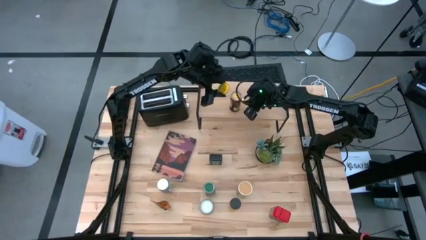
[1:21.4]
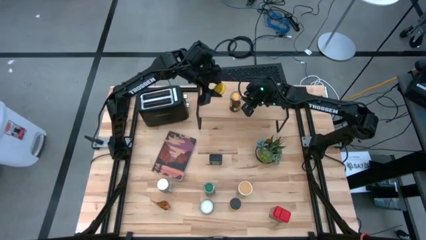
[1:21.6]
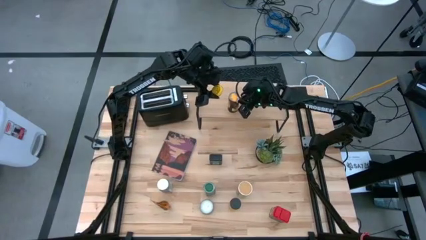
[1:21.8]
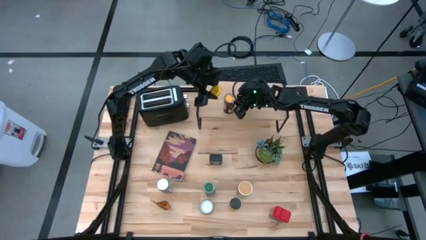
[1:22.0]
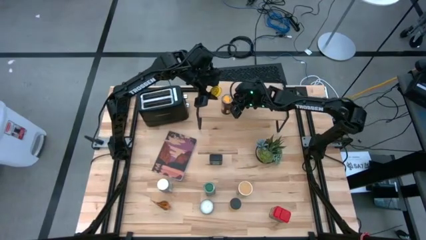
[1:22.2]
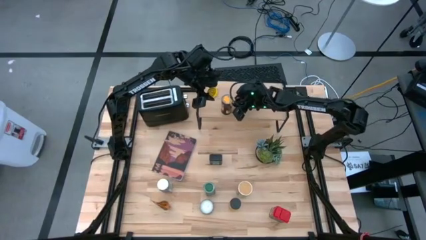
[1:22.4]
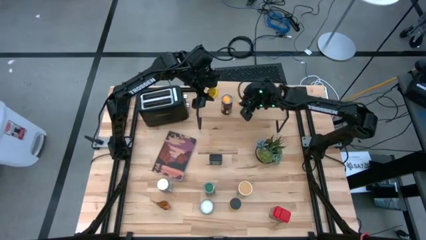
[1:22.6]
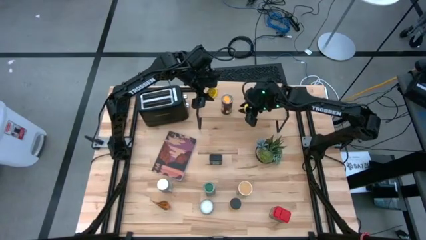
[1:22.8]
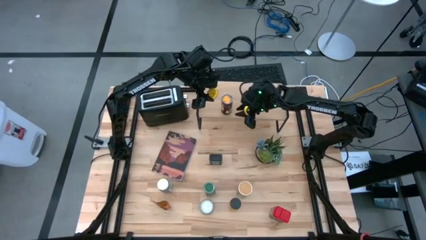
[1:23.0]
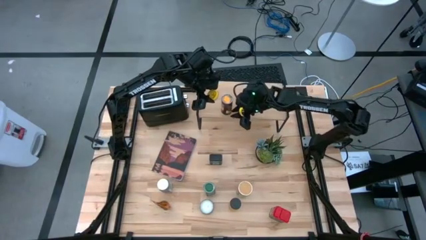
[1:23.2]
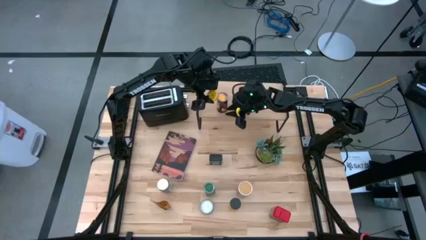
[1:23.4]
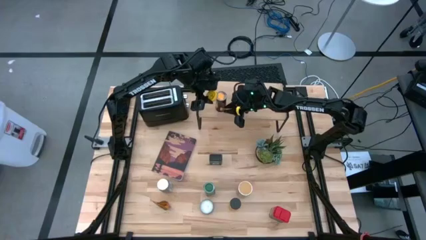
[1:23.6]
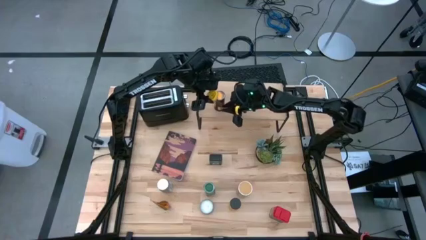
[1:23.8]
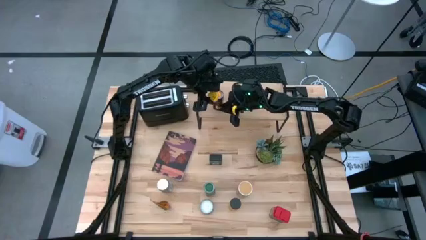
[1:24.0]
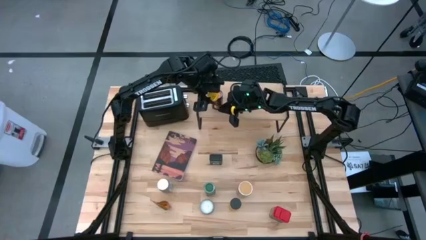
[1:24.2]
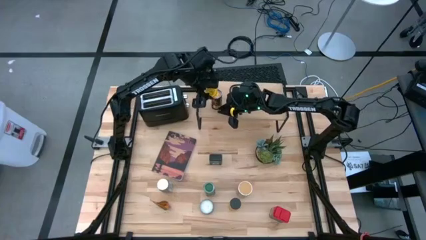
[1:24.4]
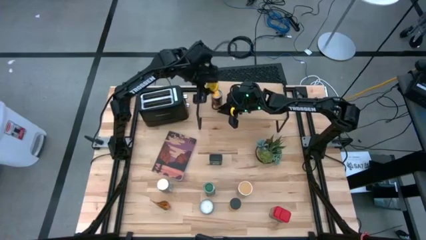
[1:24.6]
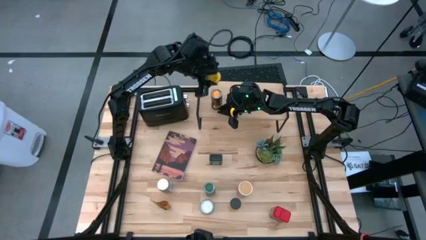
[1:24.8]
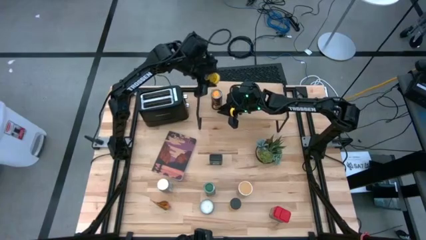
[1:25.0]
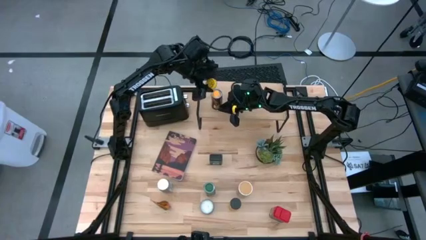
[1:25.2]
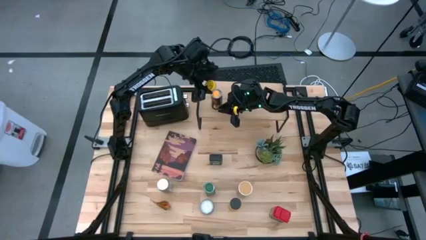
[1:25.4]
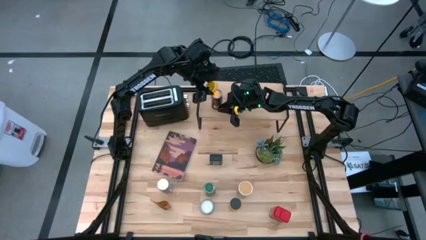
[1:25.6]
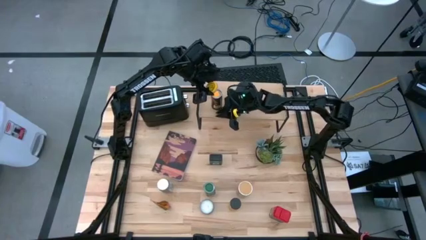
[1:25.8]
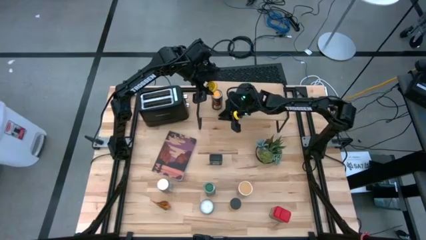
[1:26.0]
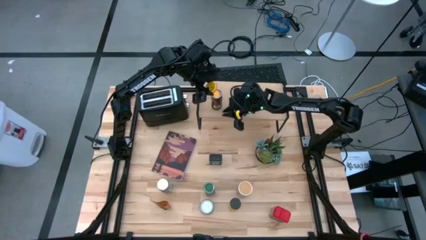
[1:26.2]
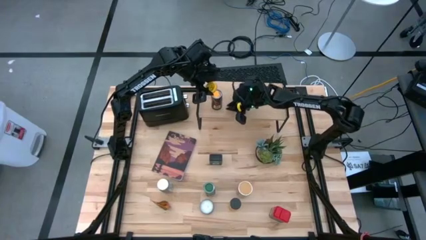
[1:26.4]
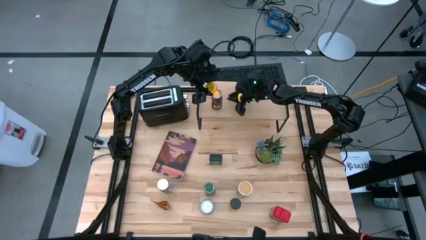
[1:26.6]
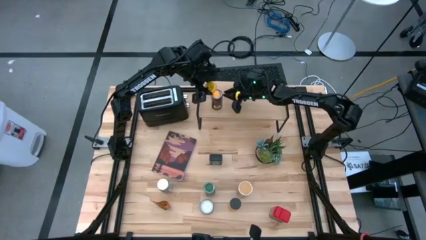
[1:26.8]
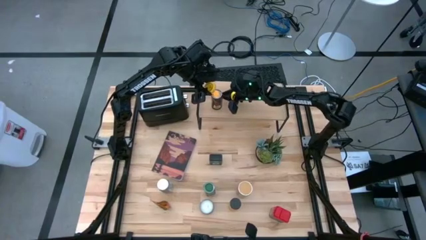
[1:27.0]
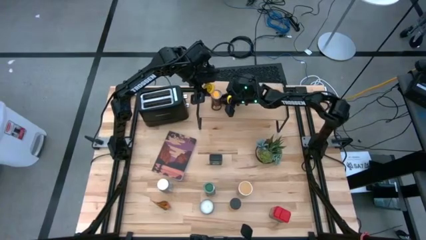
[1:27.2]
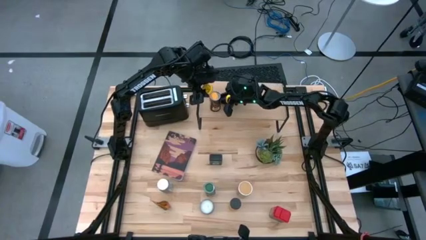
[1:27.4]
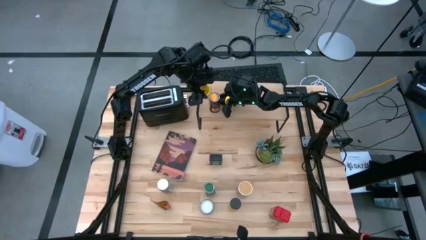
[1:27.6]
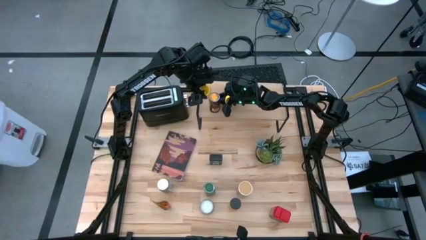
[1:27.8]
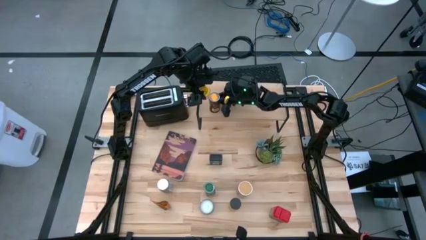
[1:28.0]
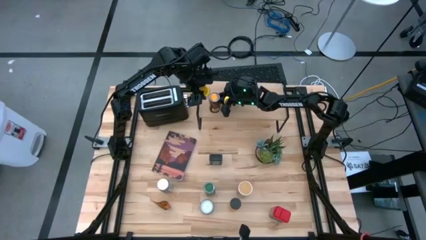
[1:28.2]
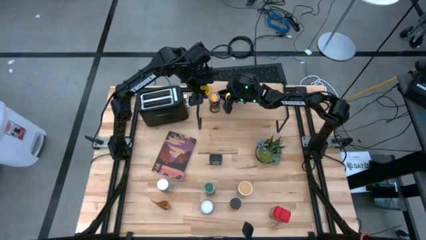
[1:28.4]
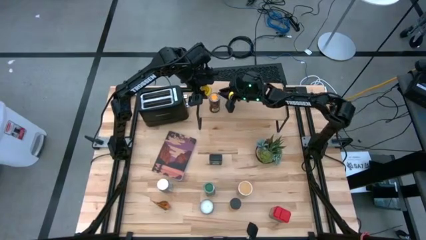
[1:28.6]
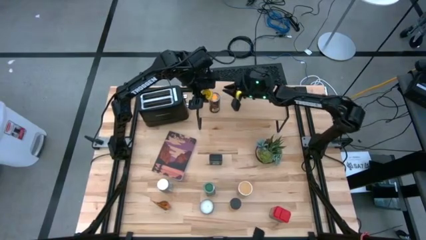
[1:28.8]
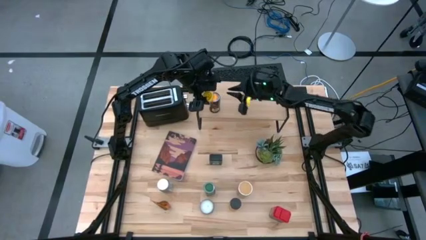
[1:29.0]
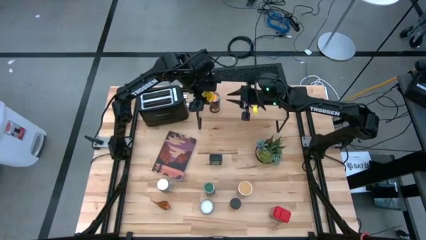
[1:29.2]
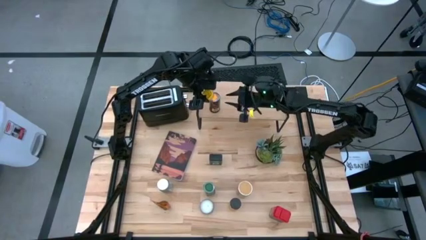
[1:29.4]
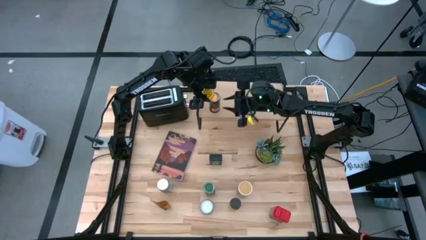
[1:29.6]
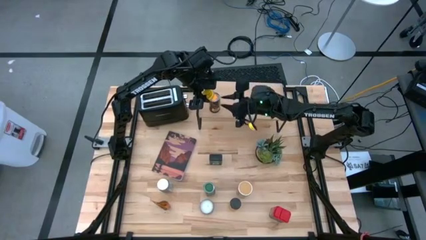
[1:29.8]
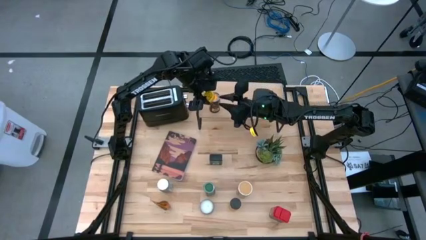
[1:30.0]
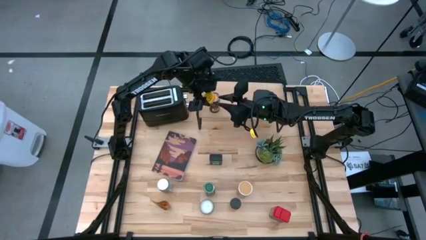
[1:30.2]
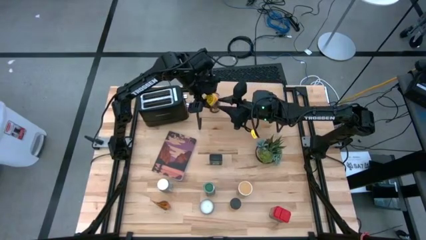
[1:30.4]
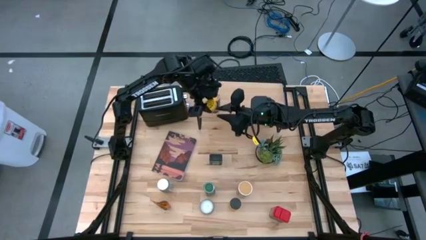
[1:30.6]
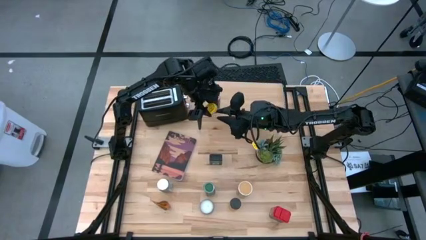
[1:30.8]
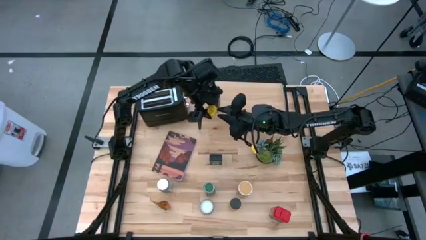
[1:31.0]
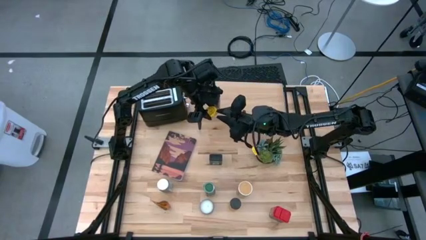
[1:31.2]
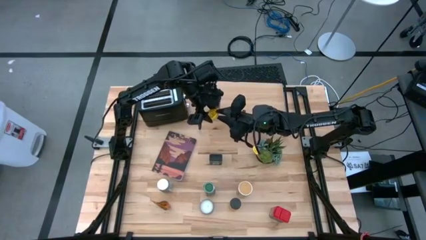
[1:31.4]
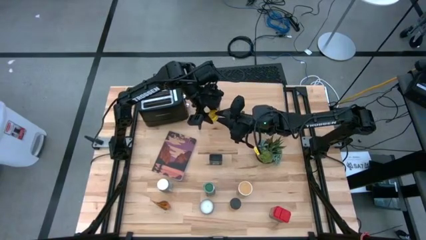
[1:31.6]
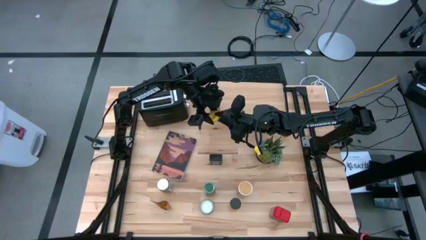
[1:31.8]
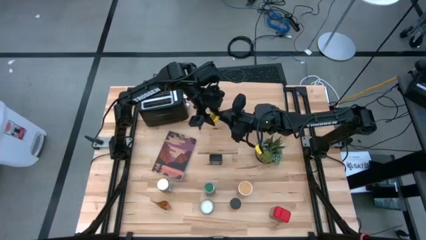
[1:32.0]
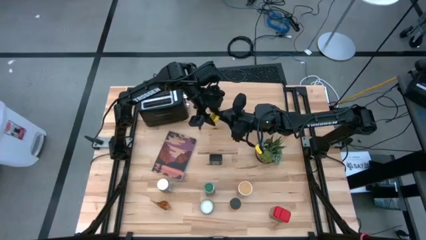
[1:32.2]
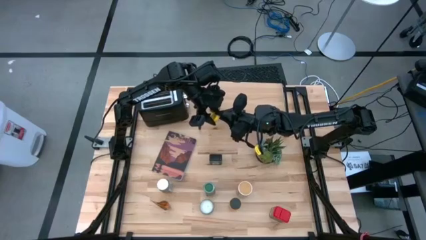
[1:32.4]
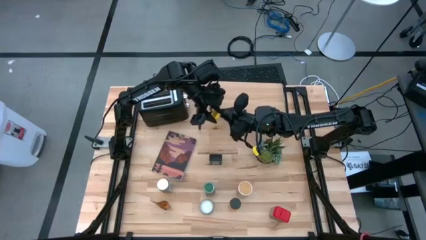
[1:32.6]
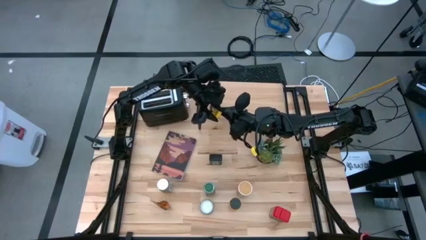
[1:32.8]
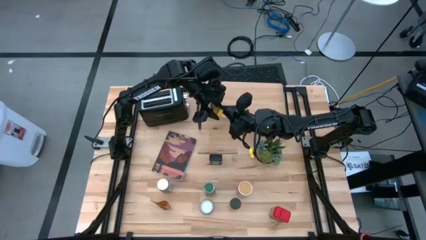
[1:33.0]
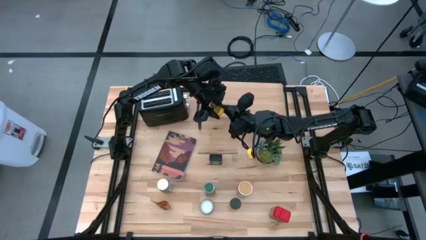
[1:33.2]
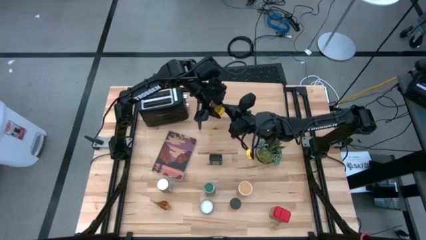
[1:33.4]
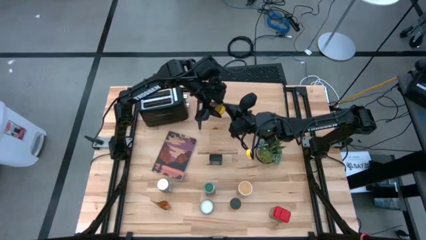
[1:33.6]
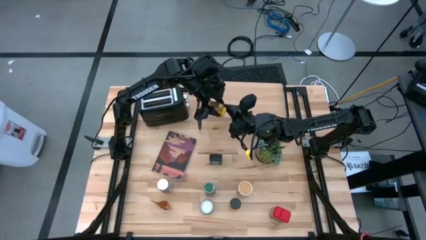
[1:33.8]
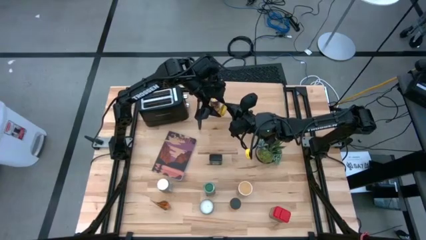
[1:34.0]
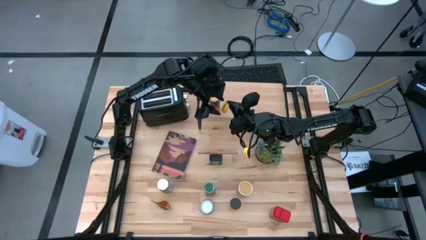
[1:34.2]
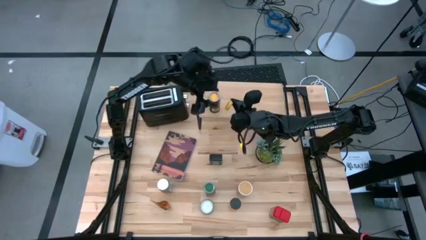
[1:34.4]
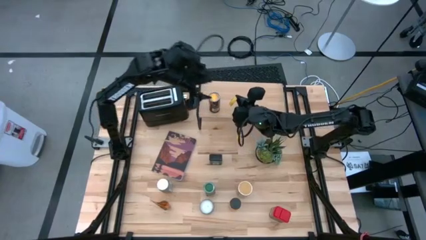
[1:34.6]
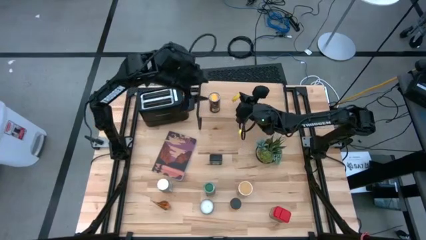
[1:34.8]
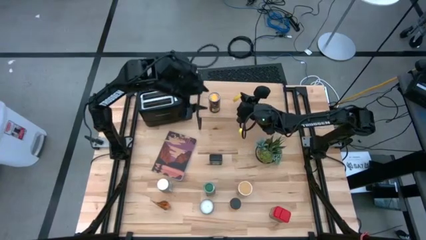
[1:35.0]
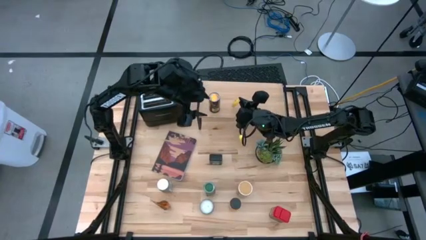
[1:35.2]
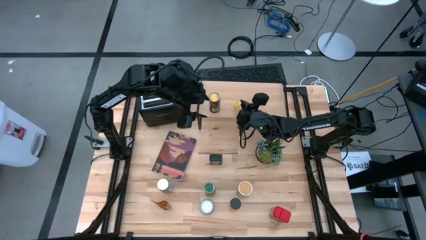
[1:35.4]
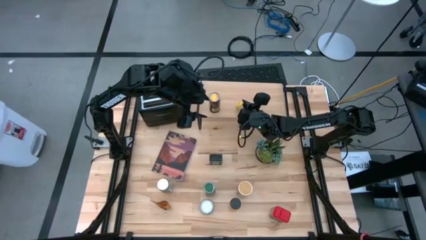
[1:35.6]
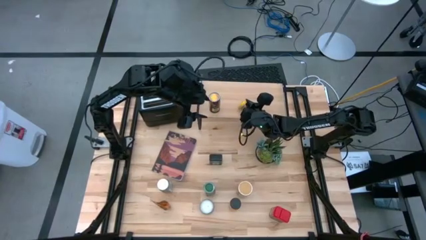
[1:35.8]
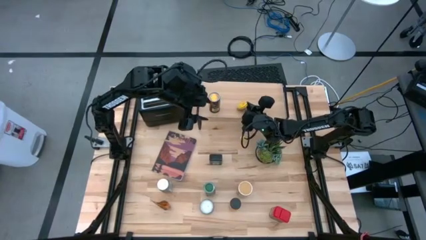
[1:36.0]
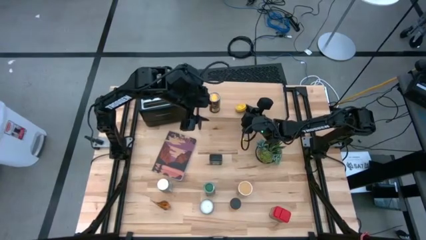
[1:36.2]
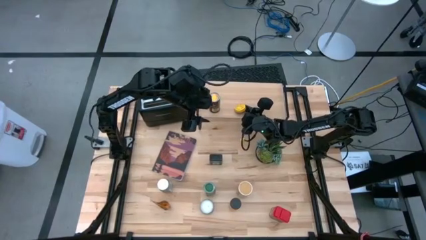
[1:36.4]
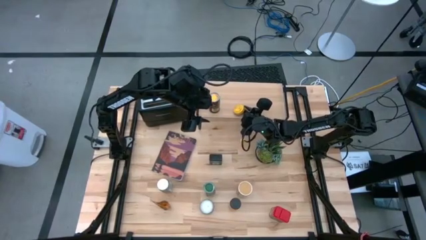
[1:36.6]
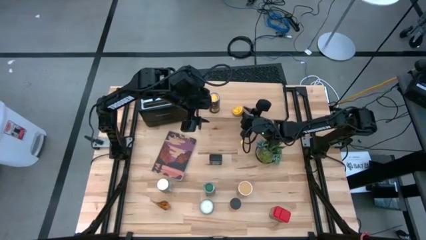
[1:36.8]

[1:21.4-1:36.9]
Task: Shelf spices
Put the yellow cap into the seasoning bottle
